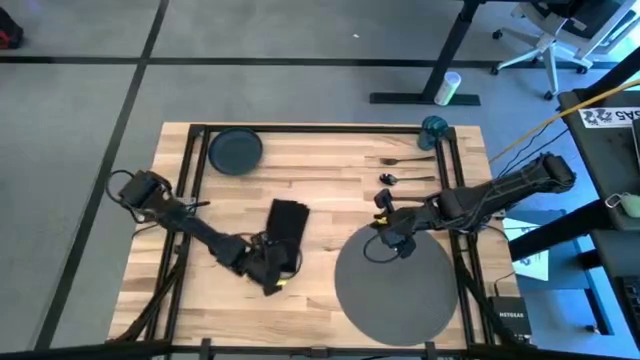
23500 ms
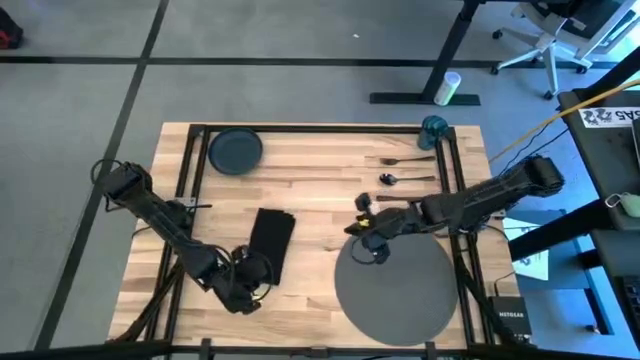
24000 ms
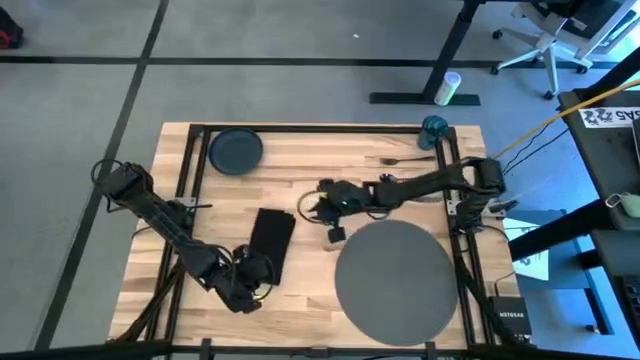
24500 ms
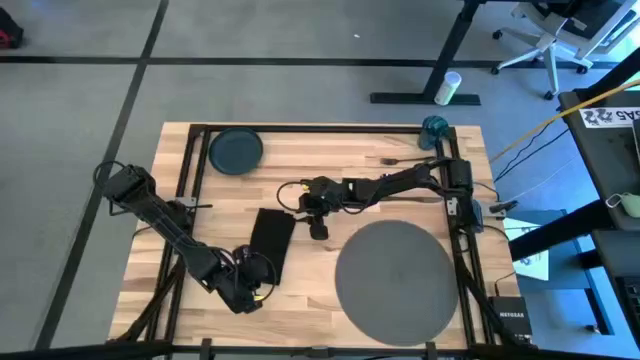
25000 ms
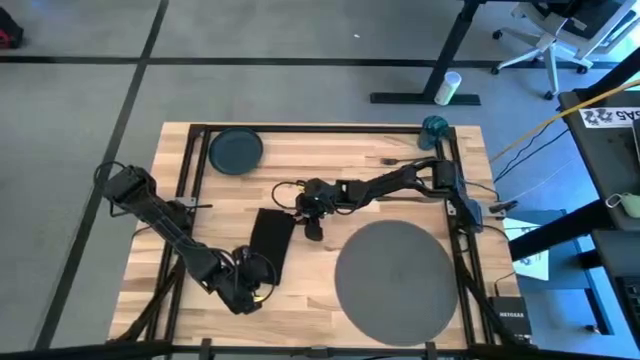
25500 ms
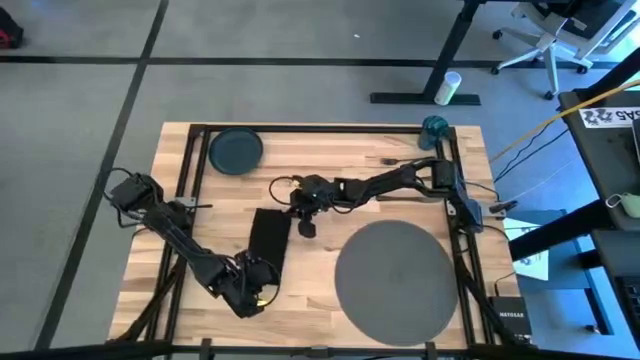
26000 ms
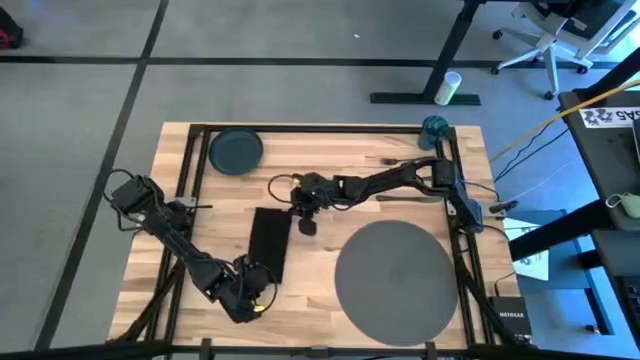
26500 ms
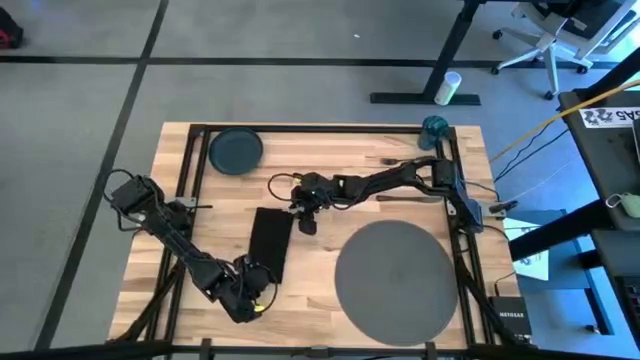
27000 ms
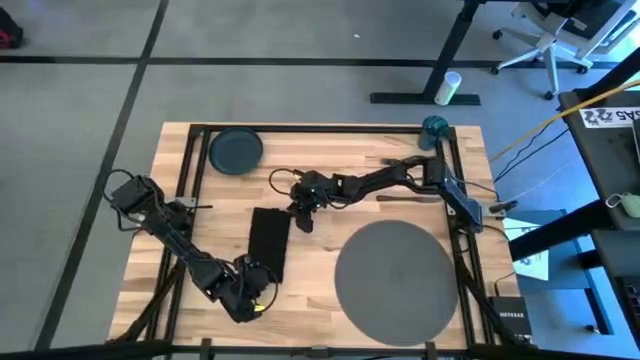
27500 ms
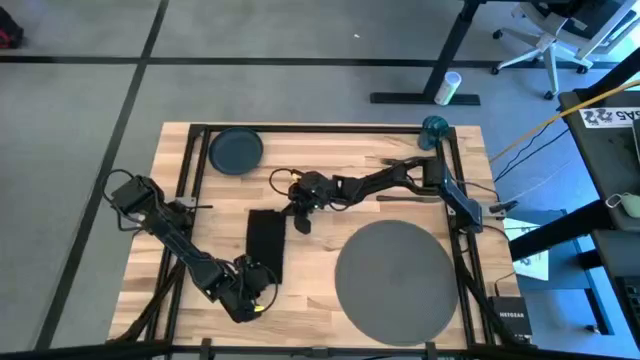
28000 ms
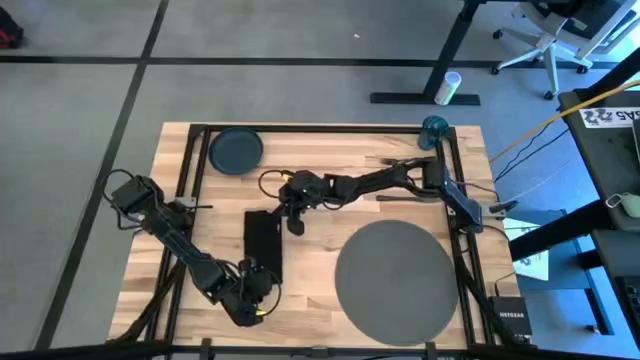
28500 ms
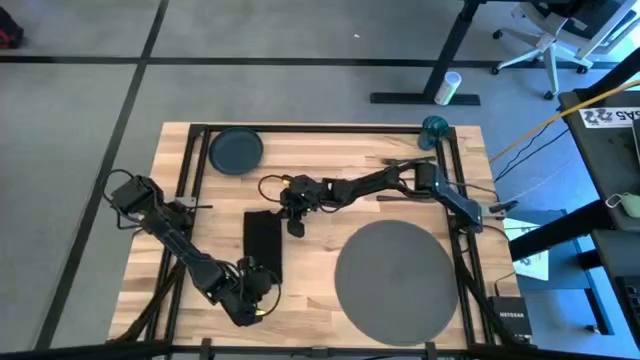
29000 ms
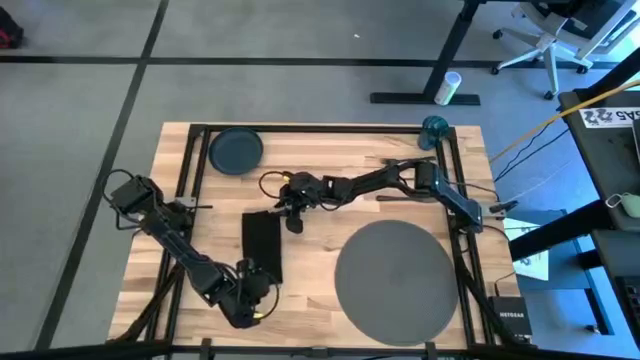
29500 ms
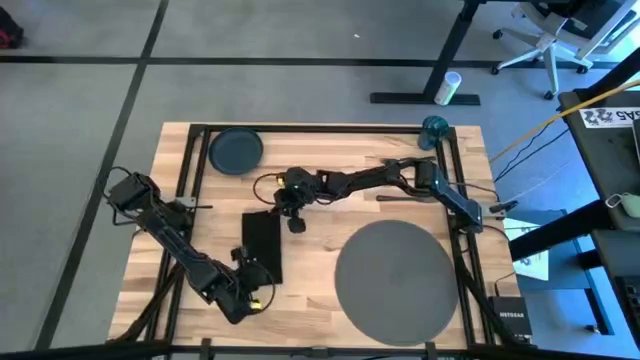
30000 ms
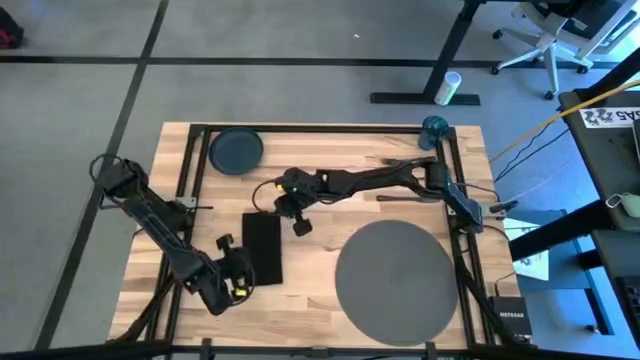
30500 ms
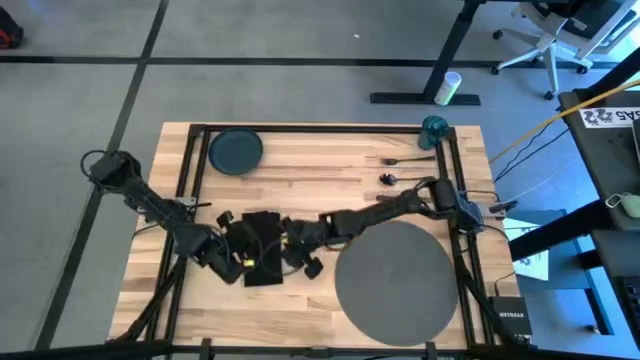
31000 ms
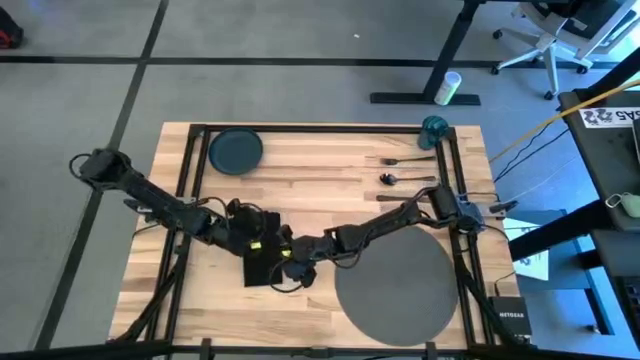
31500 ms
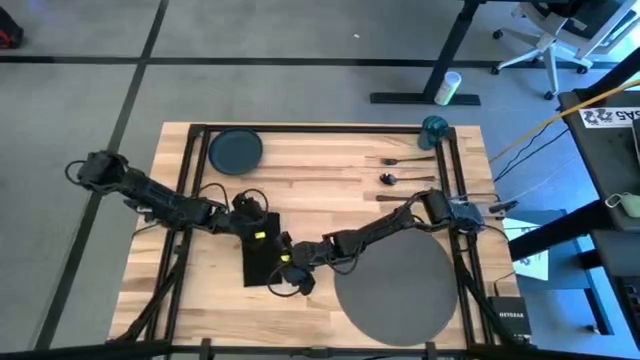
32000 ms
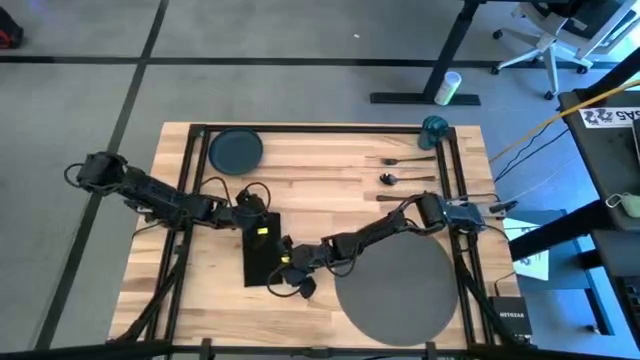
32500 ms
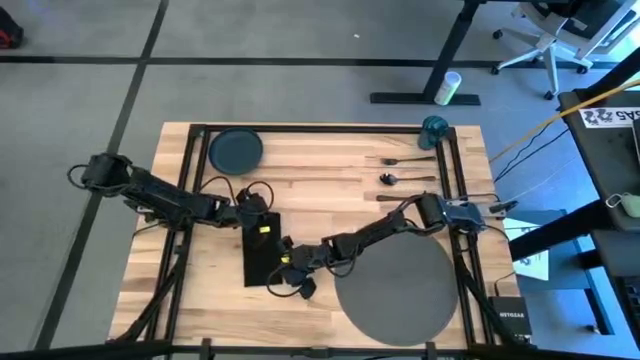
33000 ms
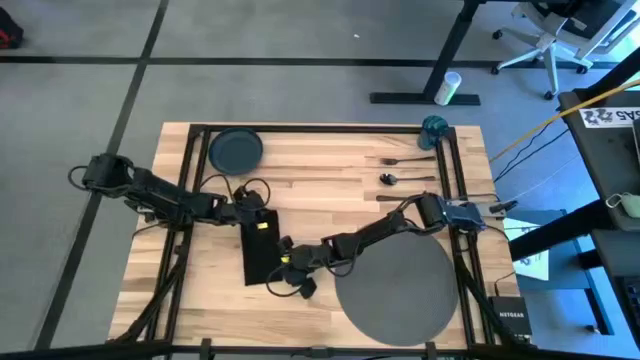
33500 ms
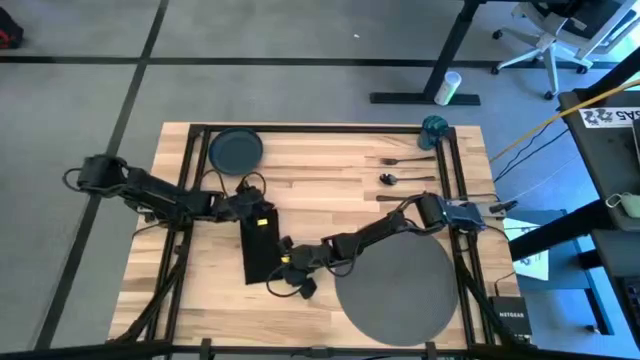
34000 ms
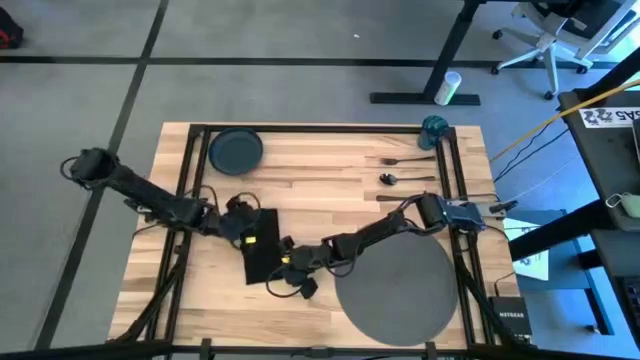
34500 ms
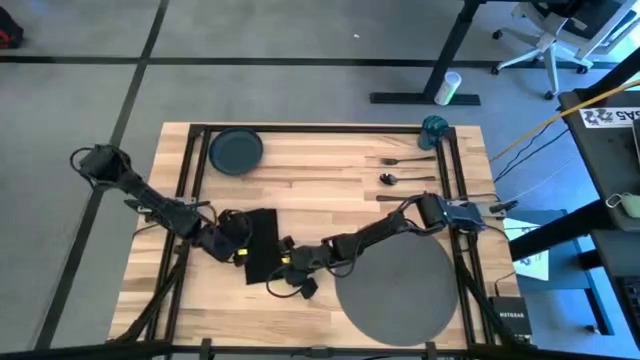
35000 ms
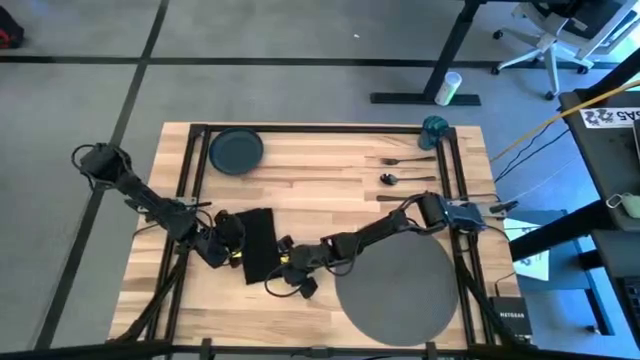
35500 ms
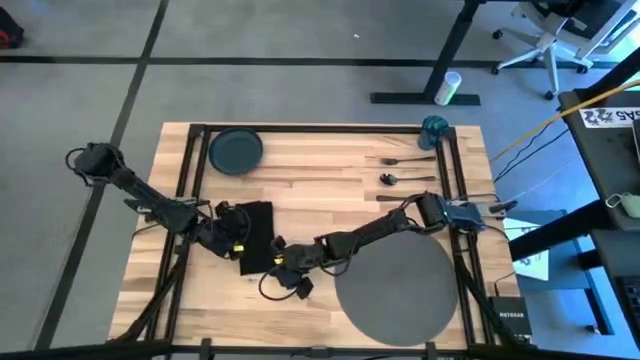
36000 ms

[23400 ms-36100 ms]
Task: Set table place
Fold the black table napkin

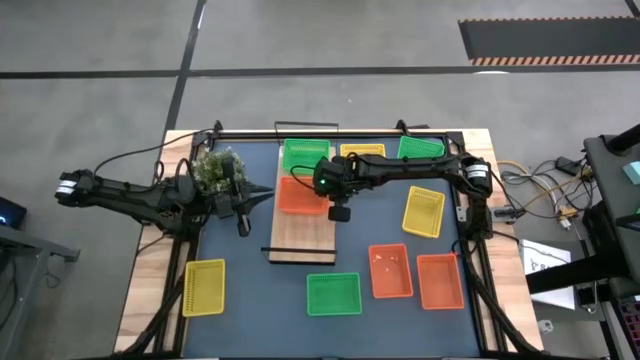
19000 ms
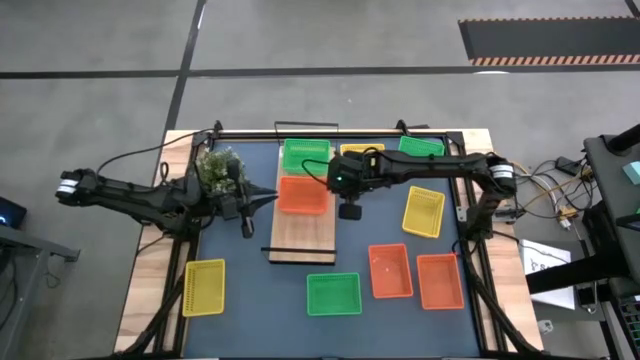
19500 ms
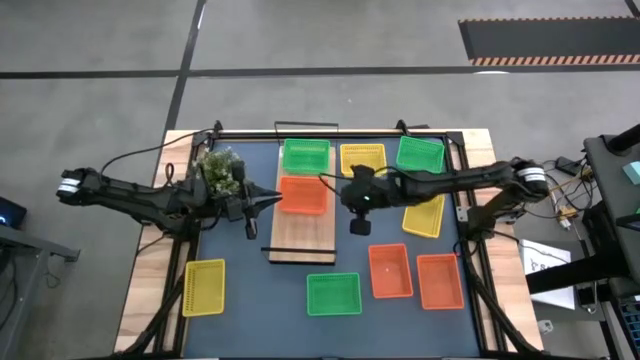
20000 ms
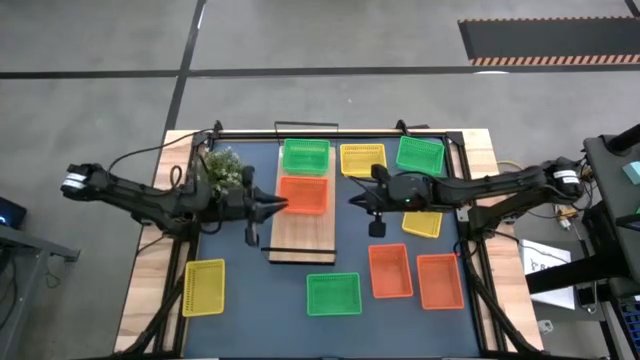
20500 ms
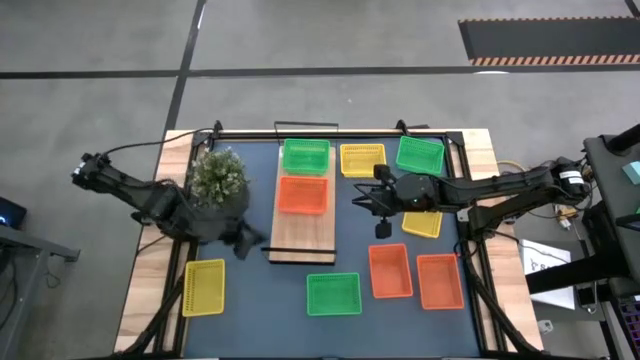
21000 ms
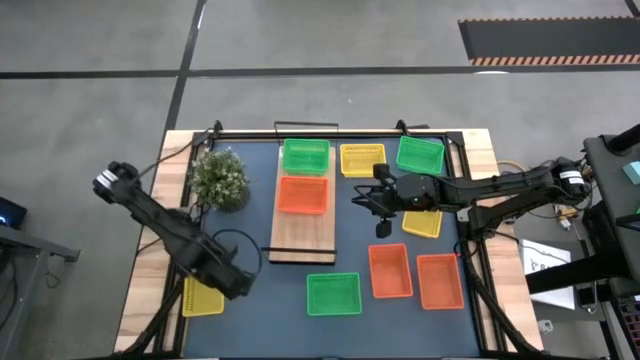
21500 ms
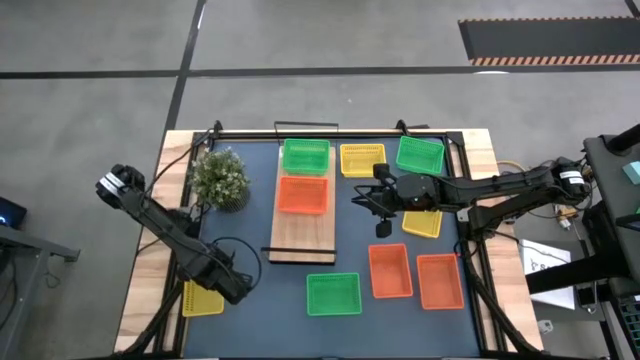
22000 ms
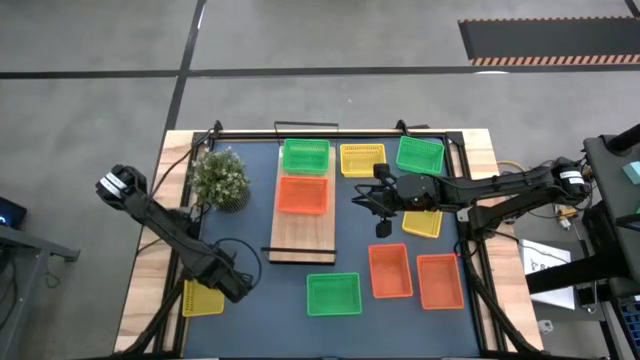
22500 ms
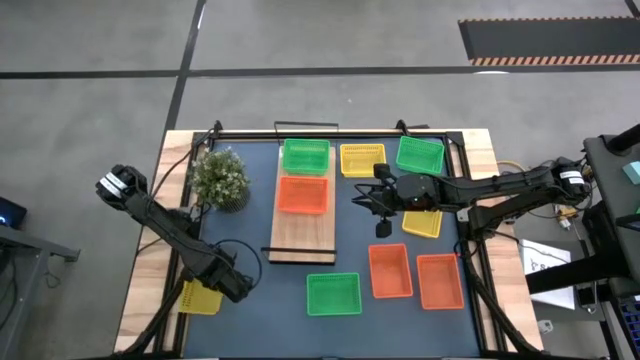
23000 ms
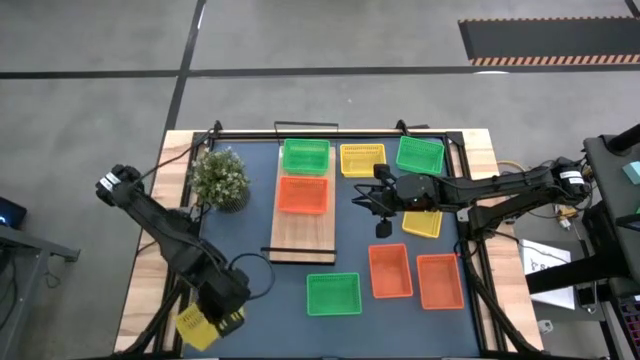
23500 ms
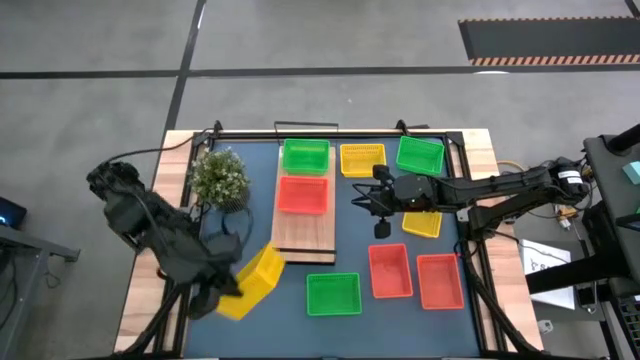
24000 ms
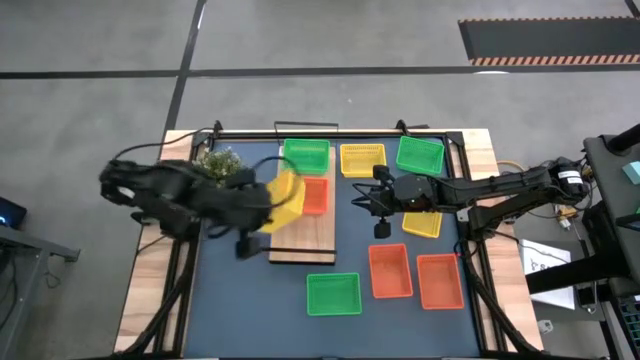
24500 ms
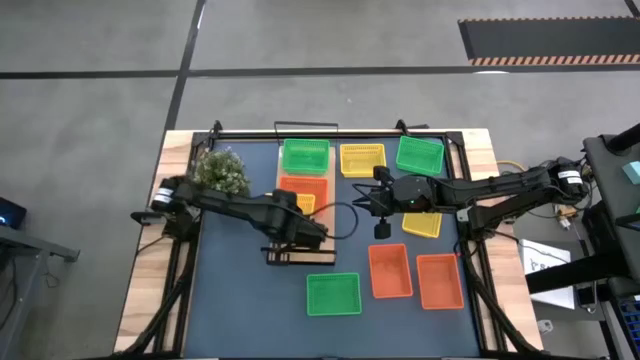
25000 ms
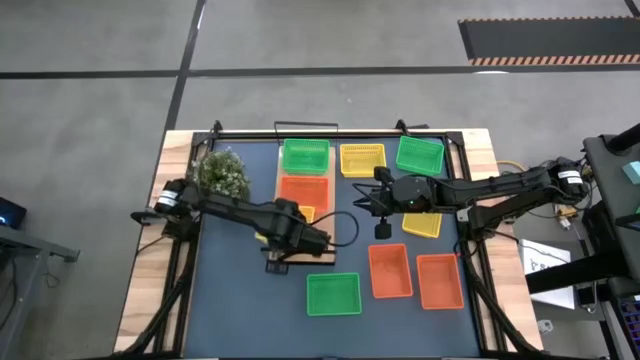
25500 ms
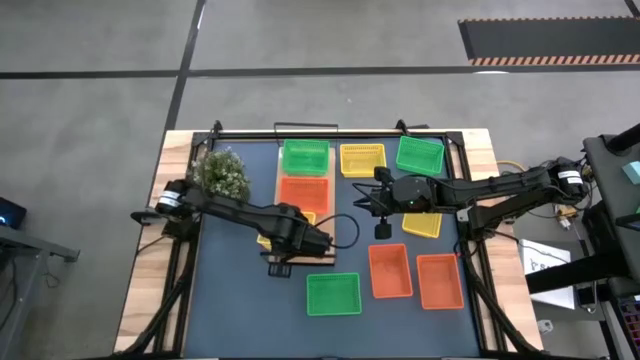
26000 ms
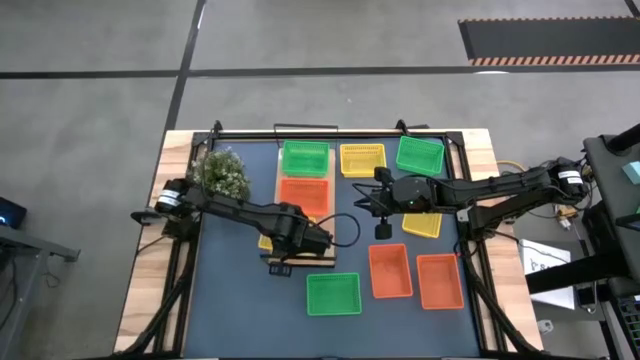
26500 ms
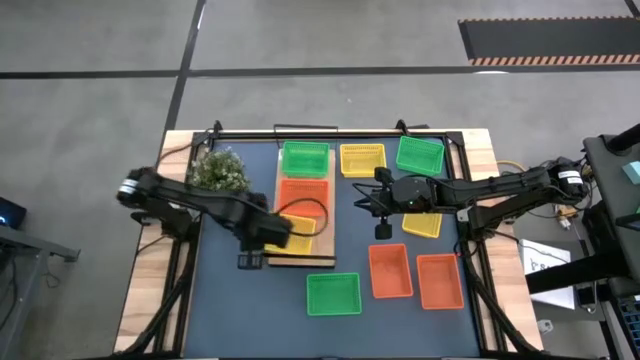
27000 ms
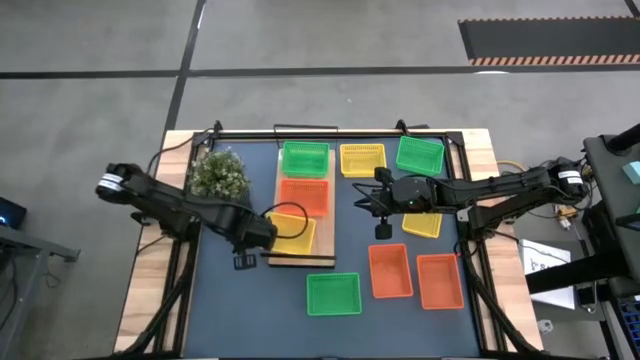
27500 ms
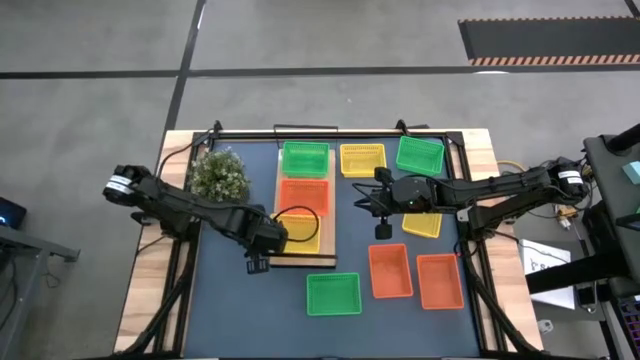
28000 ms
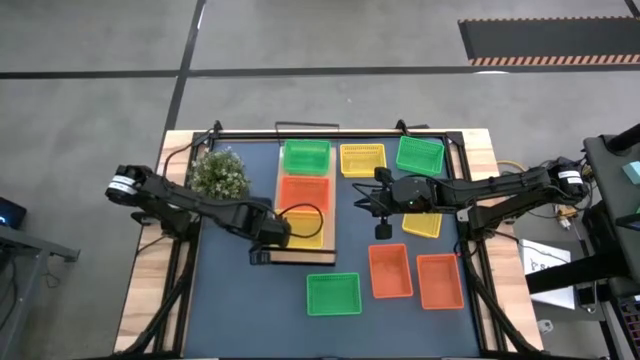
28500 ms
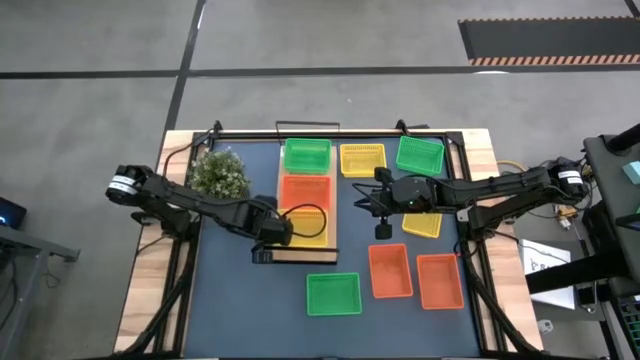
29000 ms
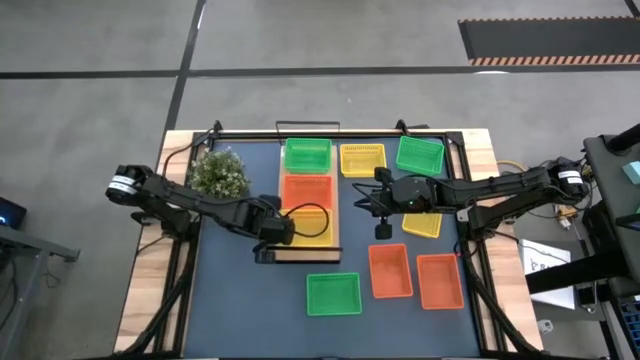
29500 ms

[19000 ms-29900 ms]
Task: Stack baskets on shelf by color
Put the bottom yellow bin on the shelf
